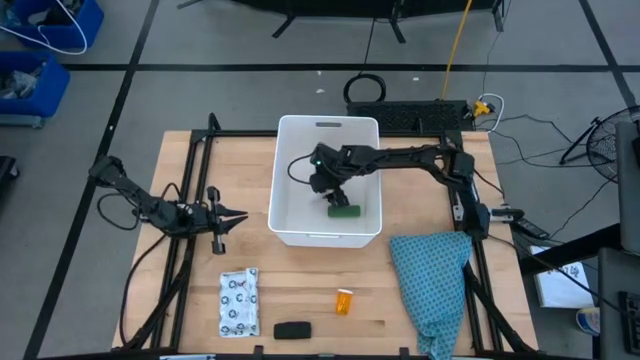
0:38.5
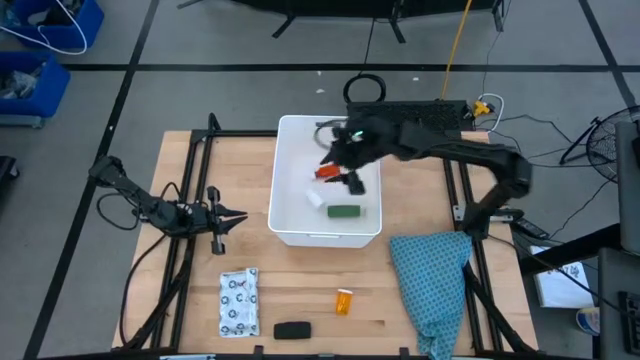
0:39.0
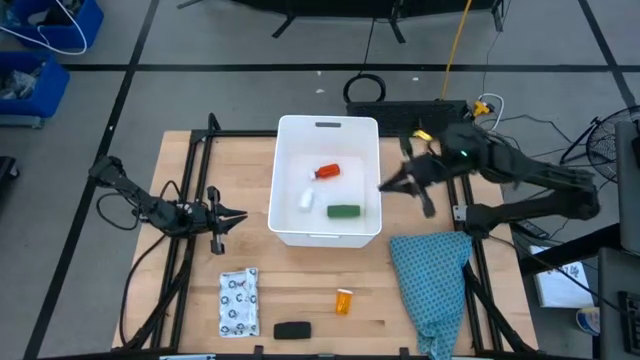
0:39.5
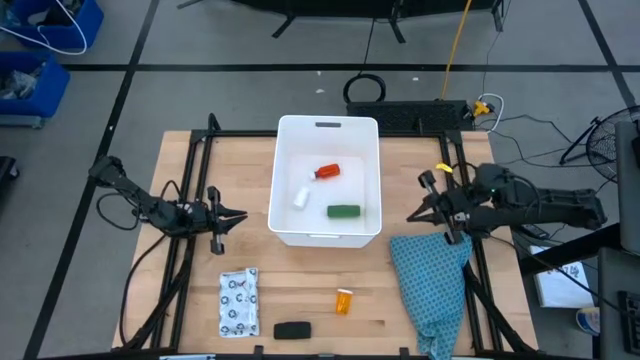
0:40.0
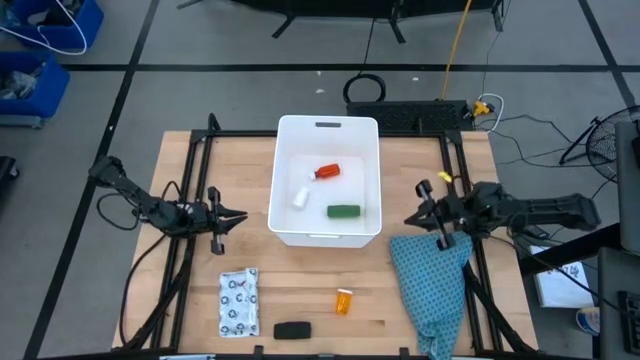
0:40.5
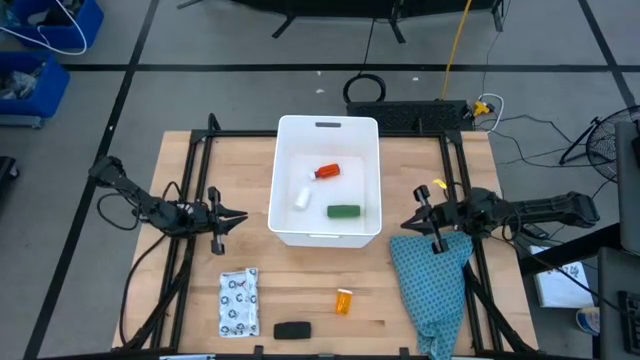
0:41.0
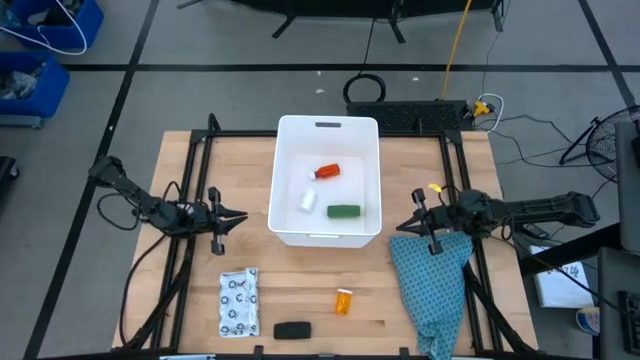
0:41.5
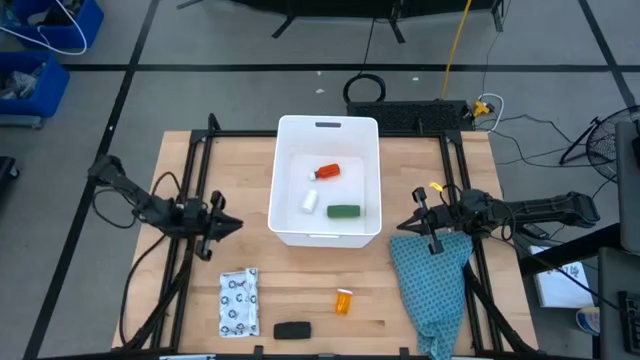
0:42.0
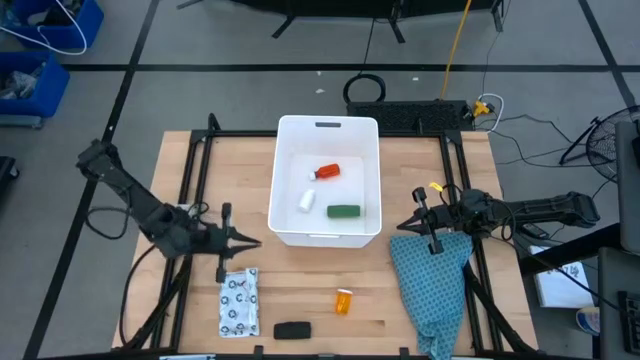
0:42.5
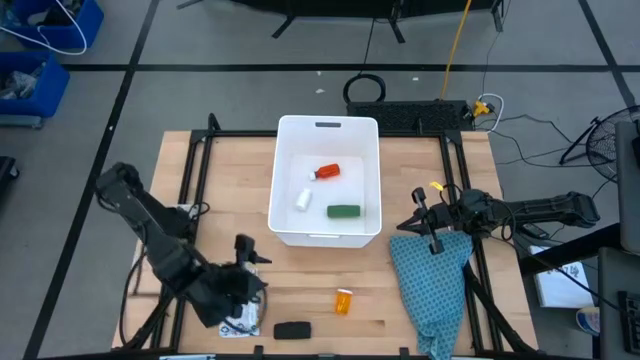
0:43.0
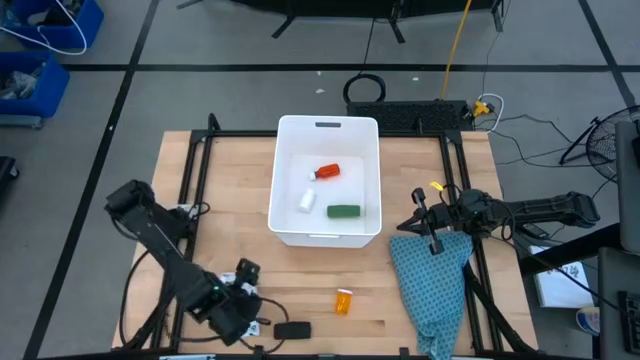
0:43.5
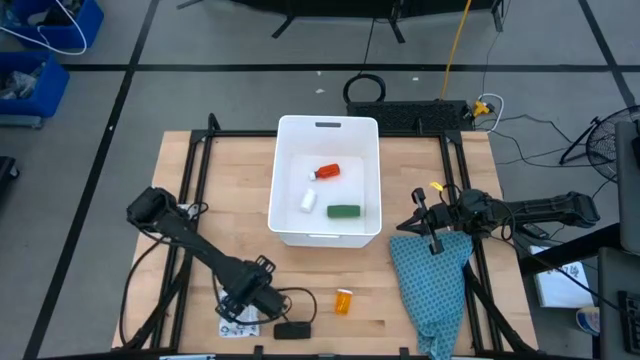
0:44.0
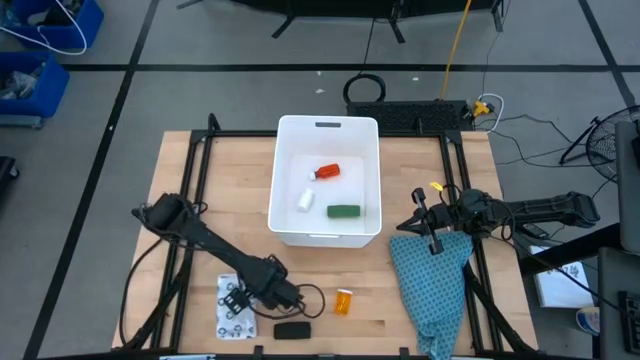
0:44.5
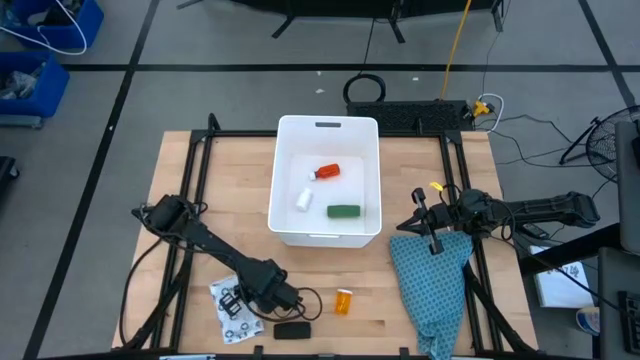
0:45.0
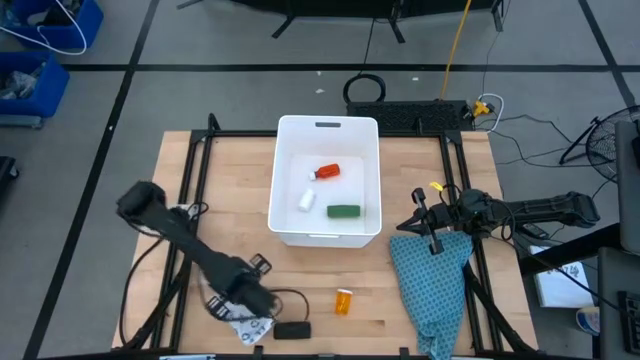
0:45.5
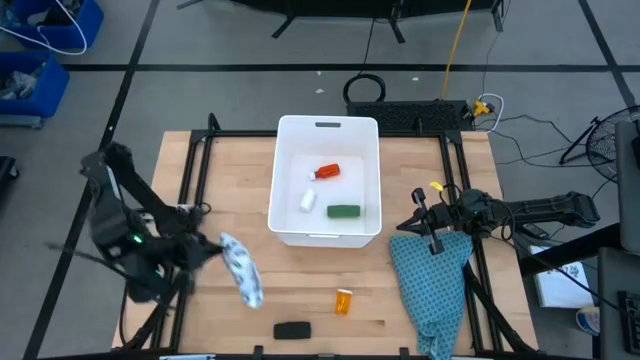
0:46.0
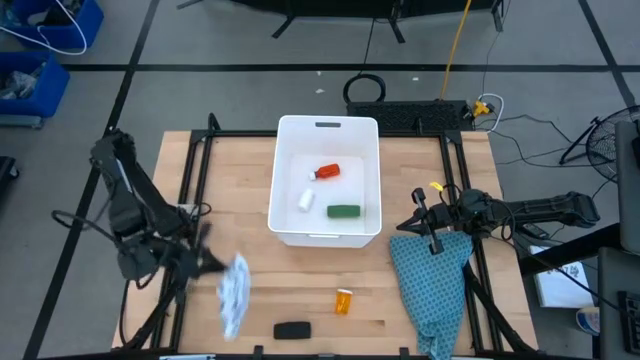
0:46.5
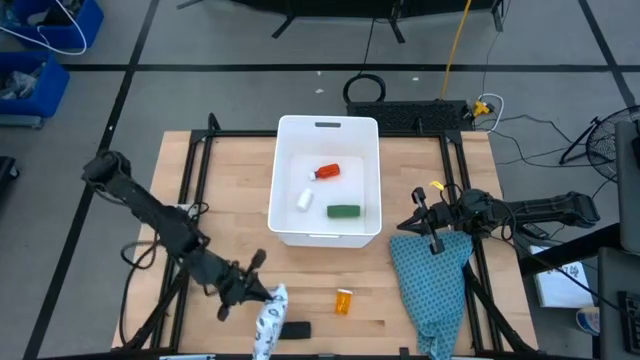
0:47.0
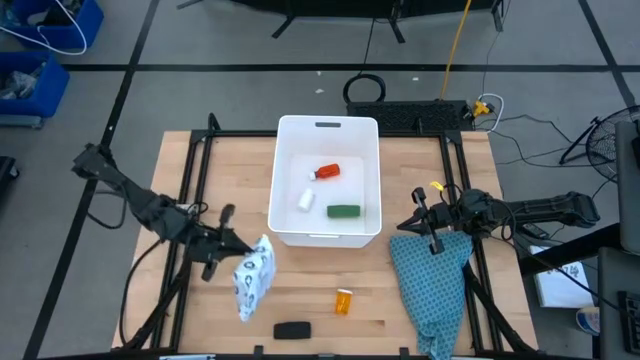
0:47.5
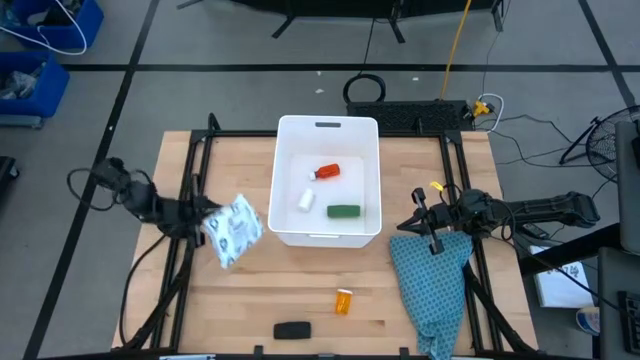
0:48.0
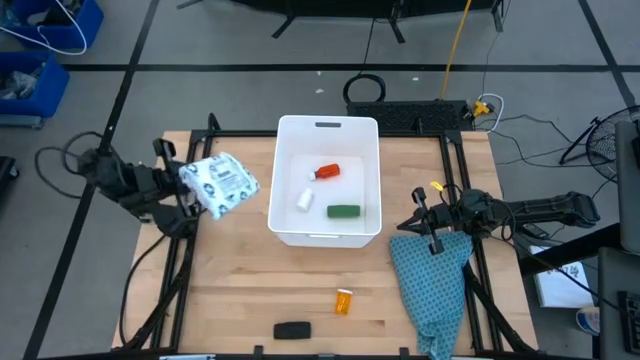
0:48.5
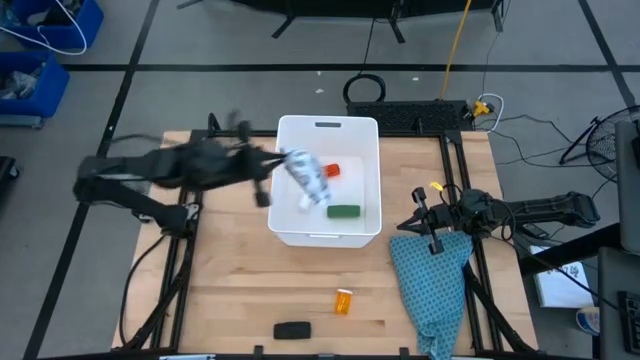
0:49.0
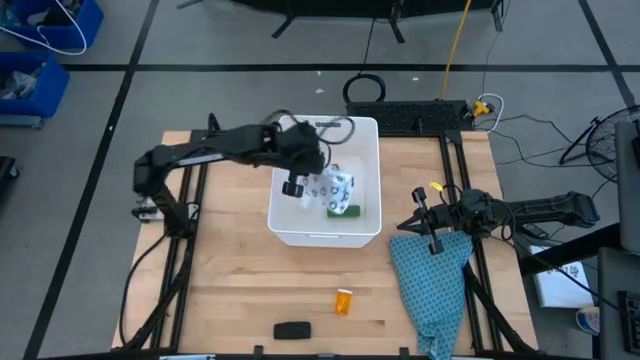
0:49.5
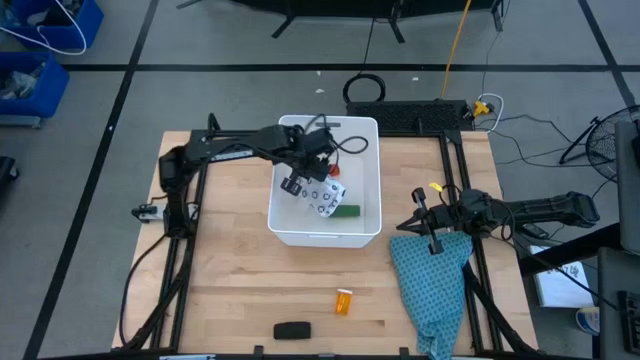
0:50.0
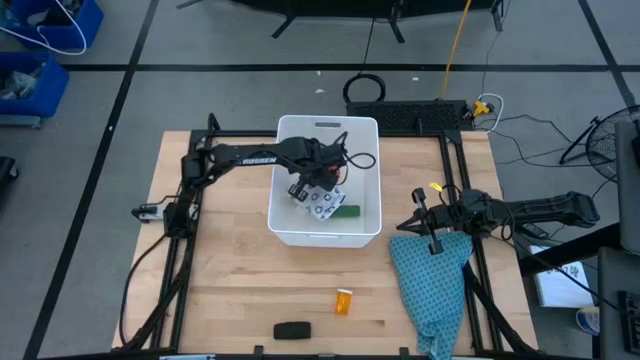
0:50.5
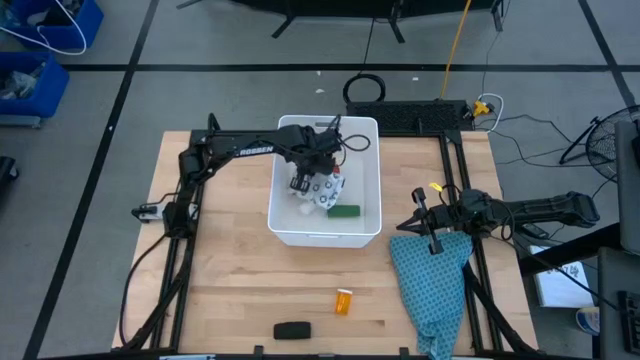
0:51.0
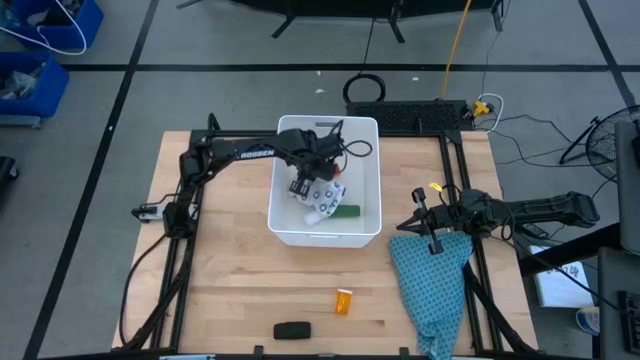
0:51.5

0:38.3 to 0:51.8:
Task: Pick & place medical supplies in basket/bin
Put the mailer bag into the basket

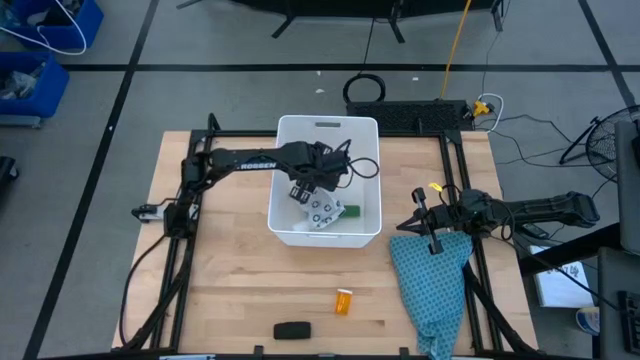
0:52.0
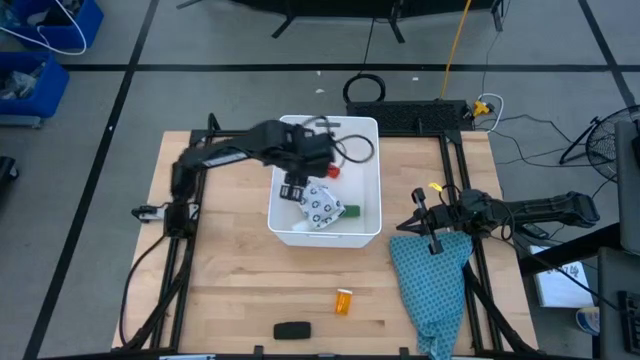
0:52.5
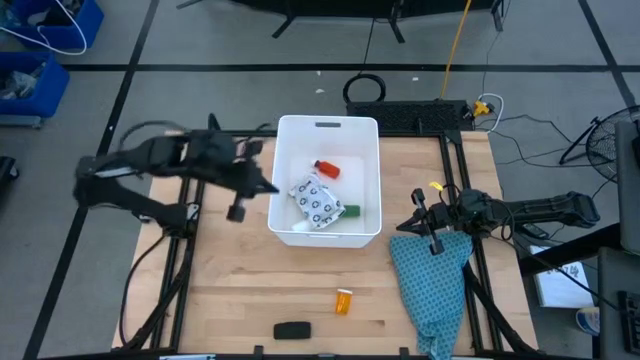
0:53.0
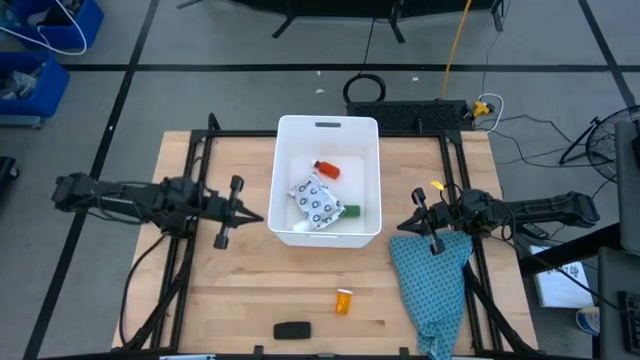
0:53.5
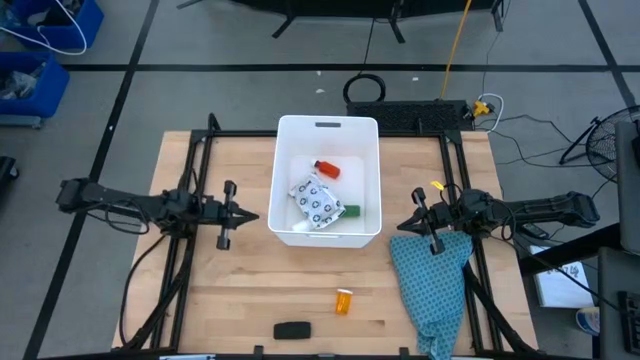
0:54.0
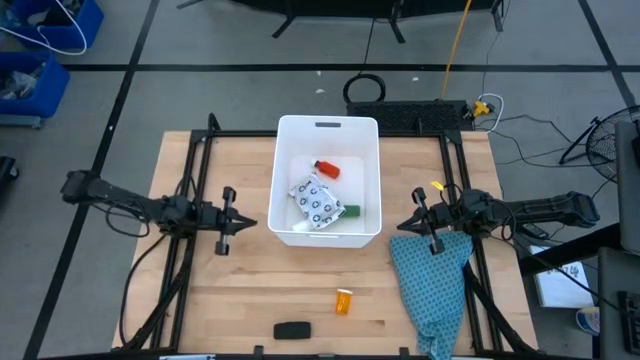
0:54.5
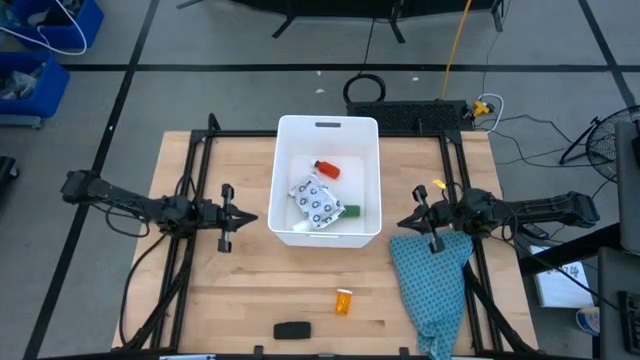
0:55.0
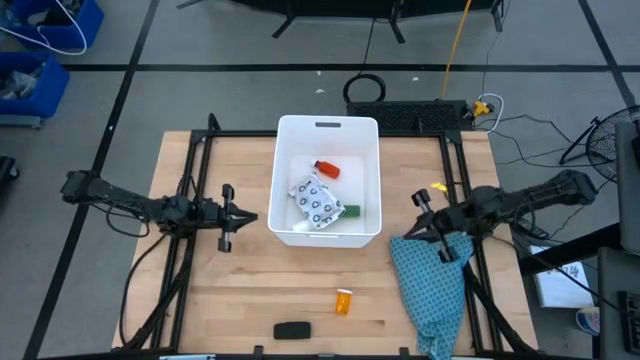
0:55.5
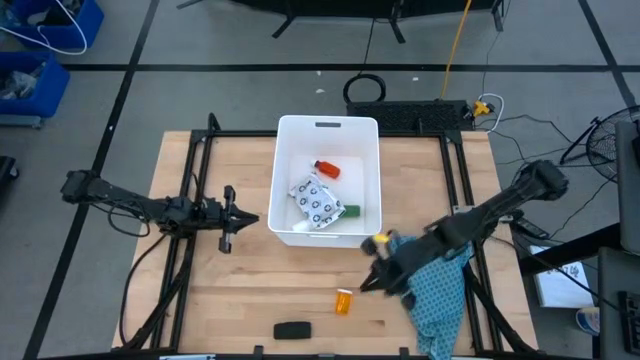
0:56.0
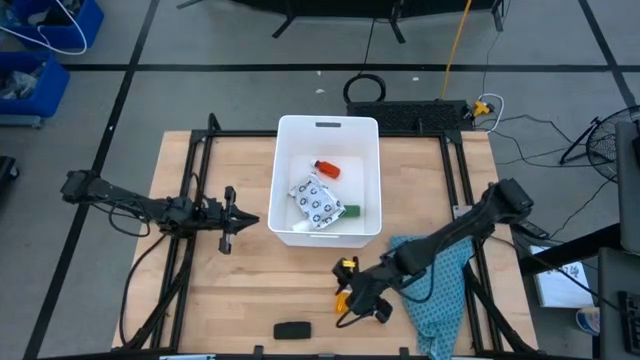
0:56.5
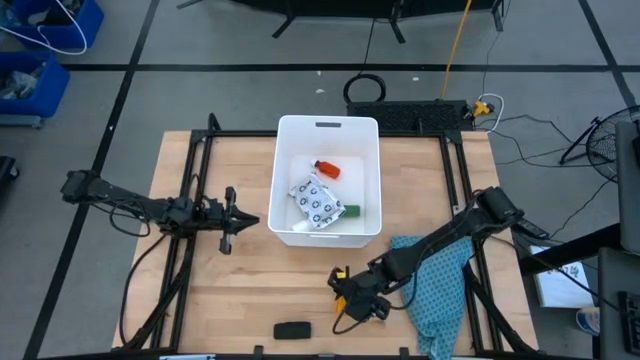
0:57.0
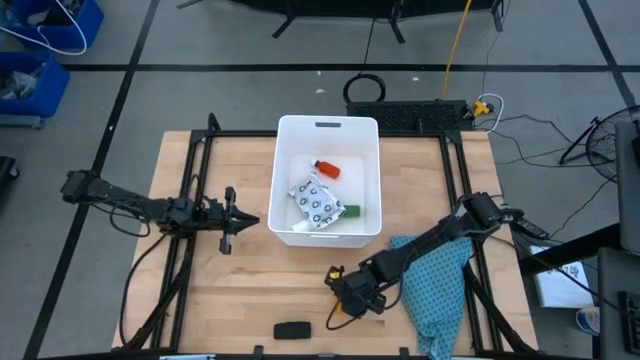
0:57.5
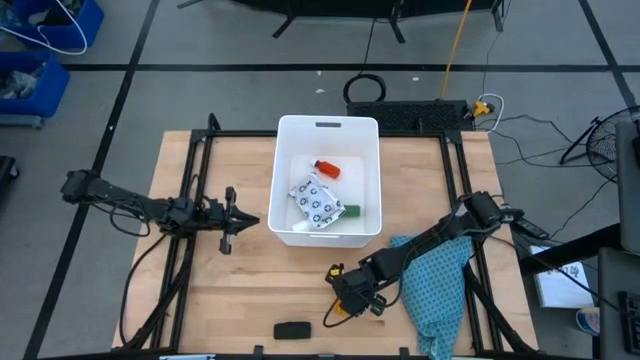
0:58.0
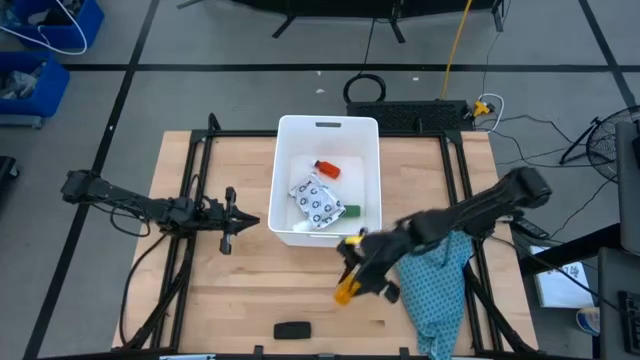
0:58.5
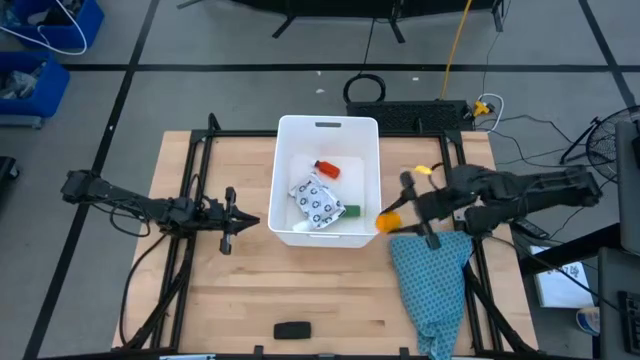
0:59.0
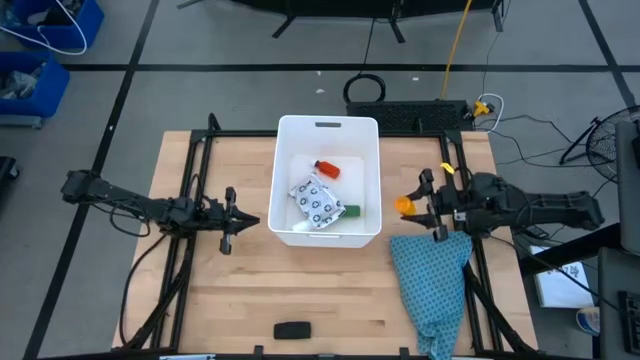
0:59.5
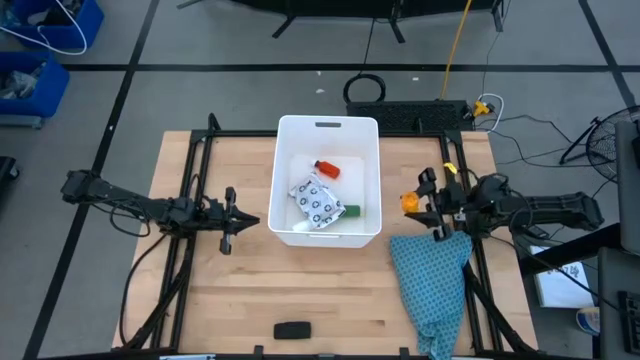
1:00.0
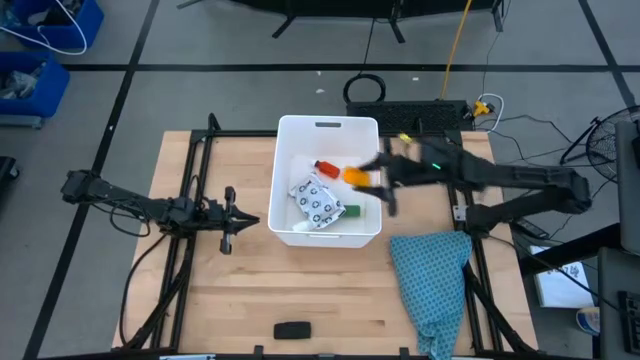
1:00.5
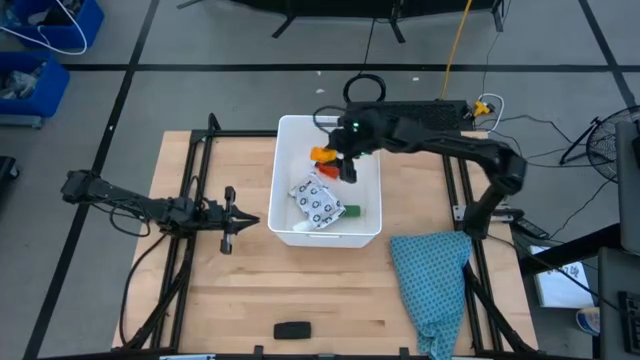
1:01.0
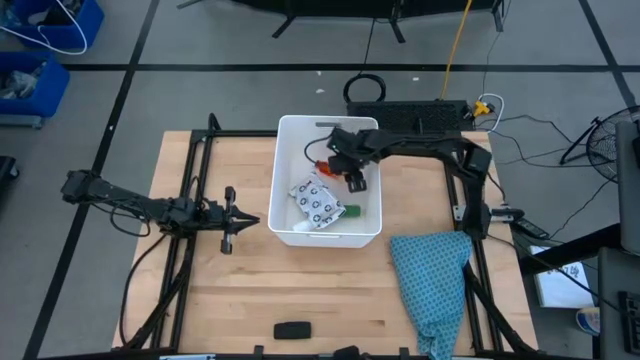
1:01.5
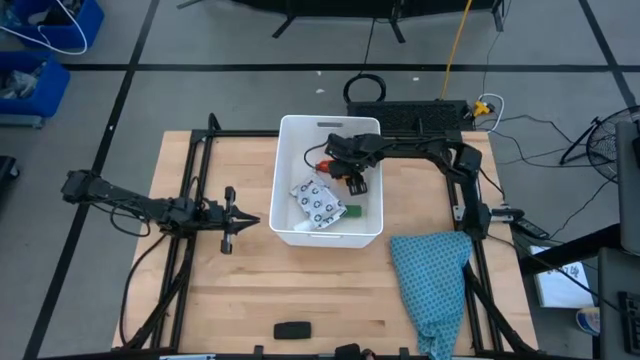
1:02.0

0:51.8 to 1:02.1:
Put the yellow medicine bottle into the basket
